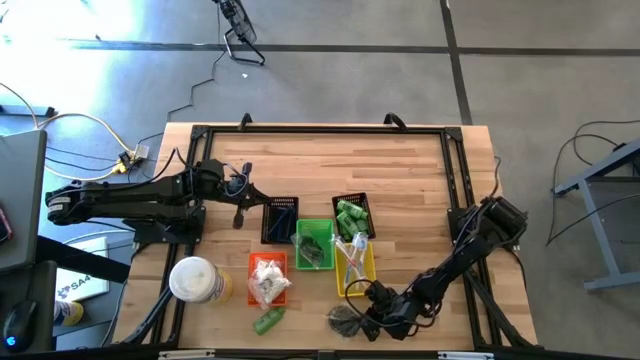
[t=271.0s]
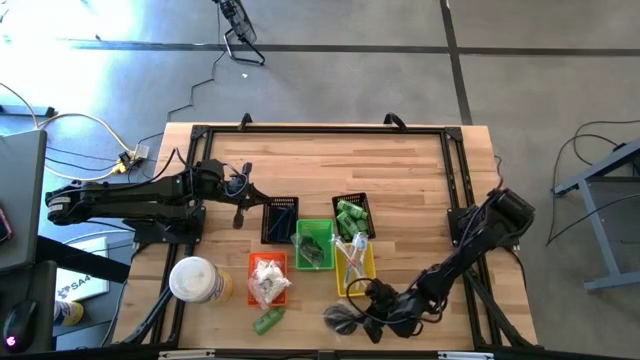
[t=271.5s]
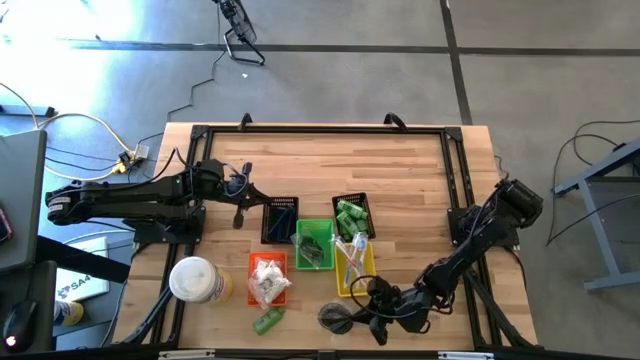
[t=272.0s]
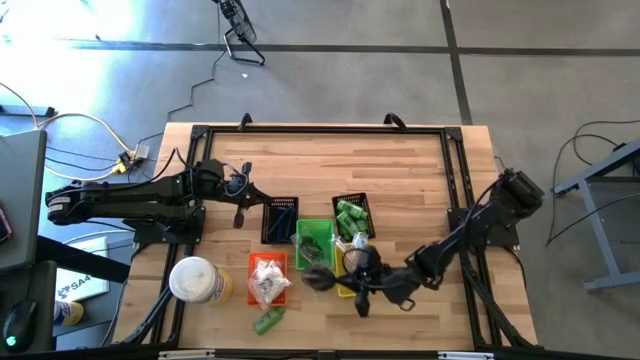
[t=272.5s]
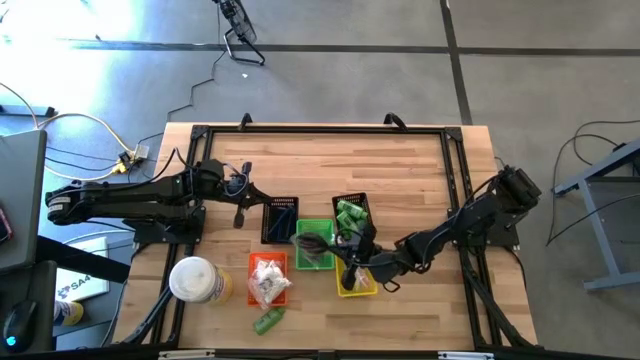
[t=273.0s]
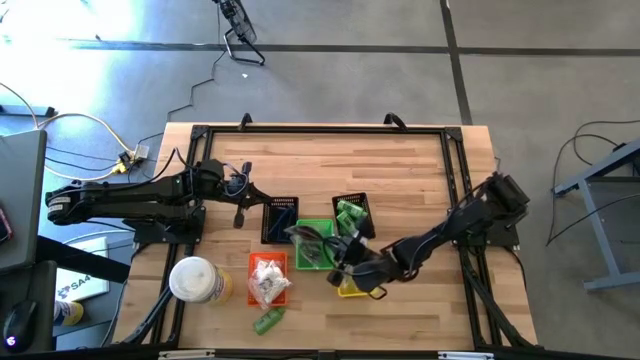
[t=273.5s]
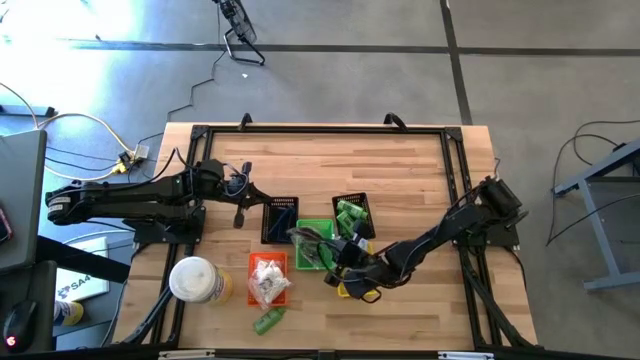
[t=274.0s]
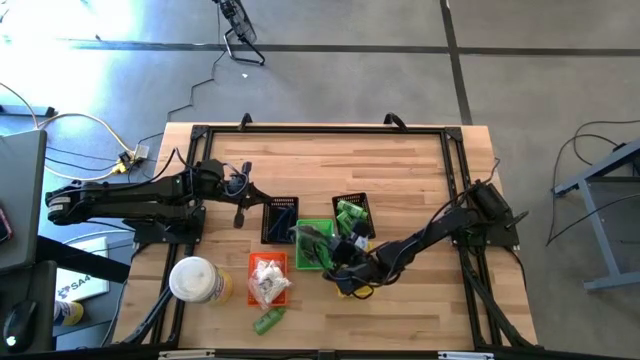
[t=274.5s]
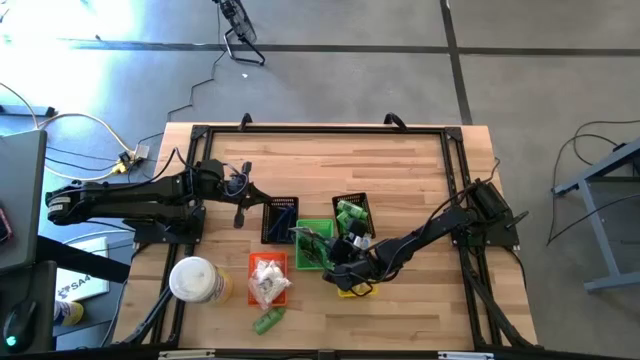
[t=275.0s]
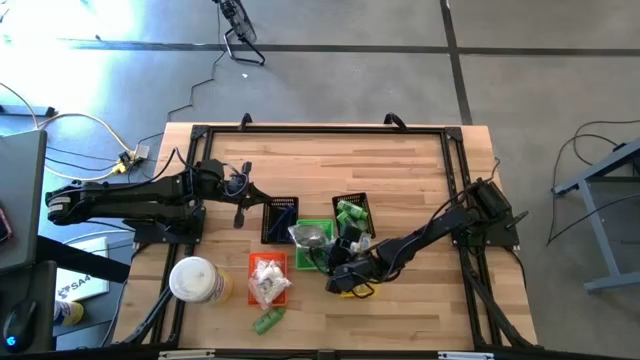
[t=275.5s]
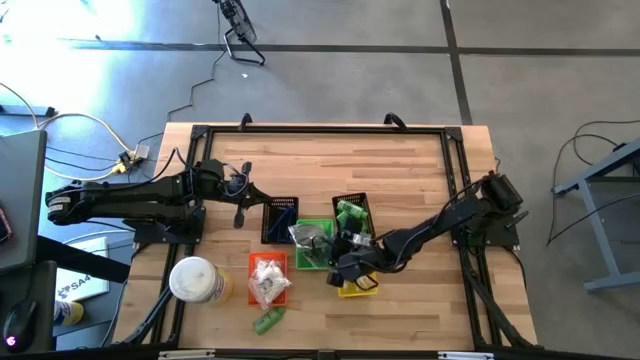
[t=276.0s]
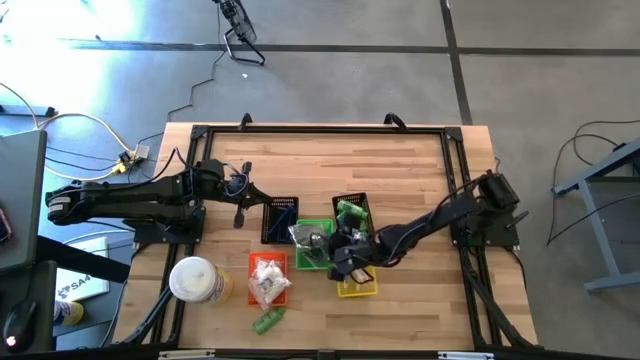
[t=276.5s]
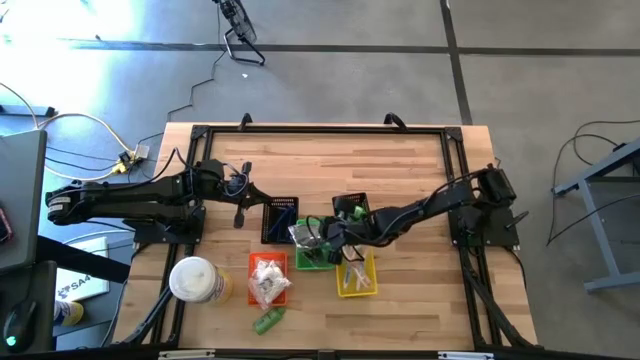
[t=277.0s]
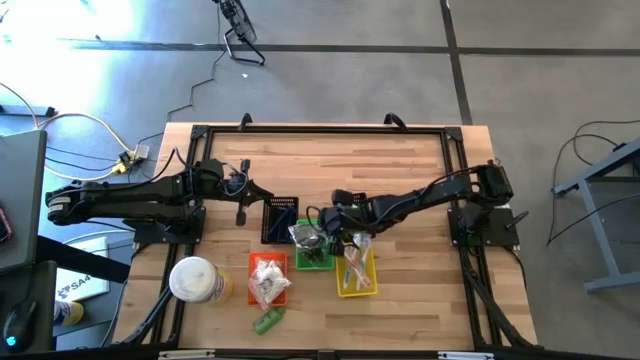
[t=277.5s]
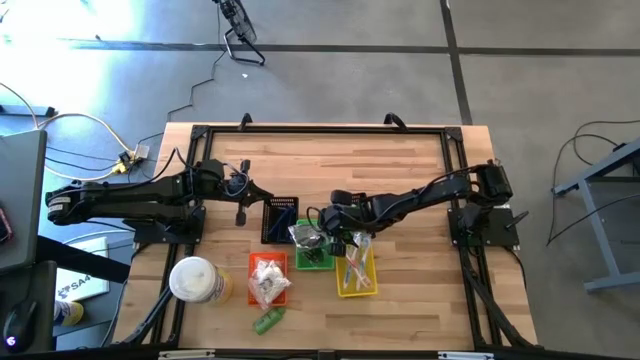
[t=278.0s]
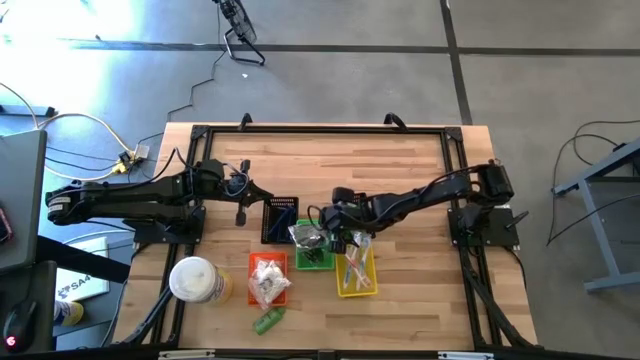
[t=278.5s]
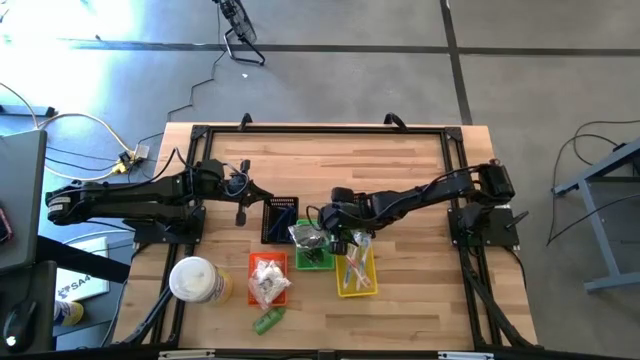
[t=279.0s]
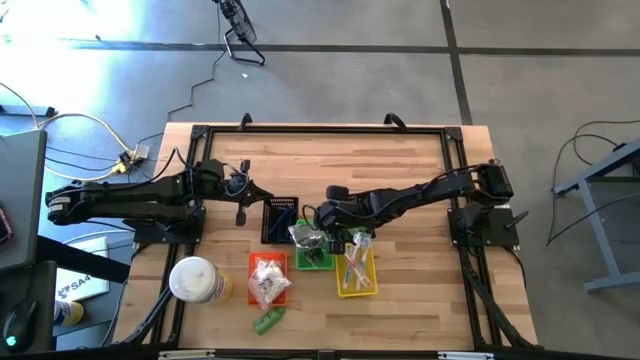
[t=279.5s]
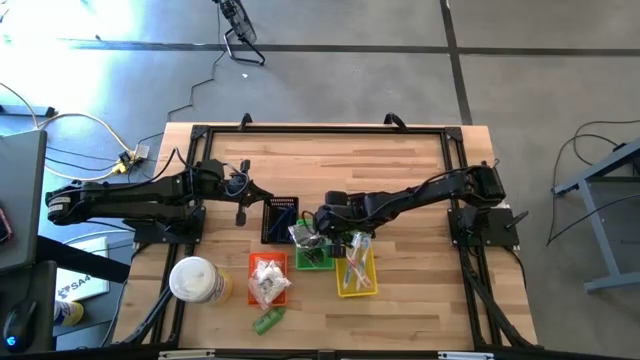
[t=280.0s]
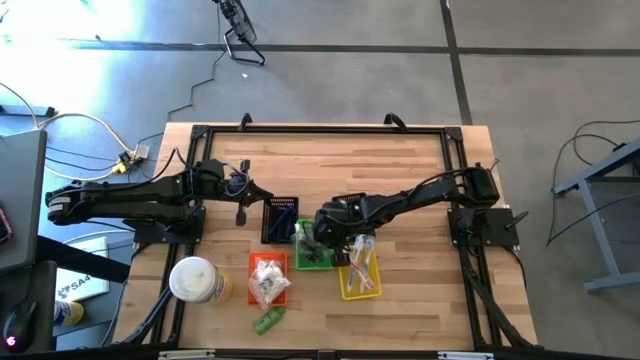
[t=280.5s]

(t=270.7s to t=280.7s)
Task: Pick & Place Travel size toiletries
Put the black hairbrush into the green bin

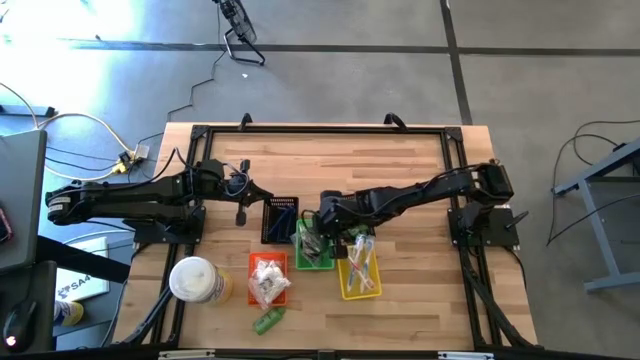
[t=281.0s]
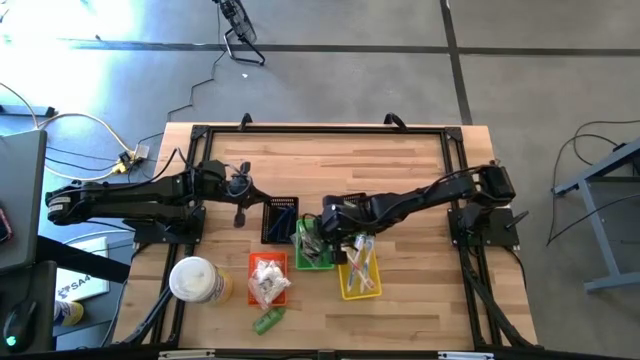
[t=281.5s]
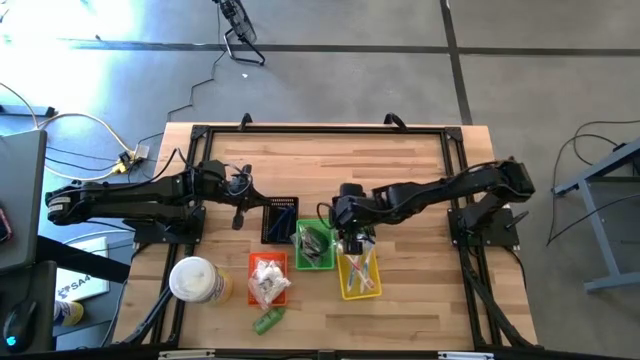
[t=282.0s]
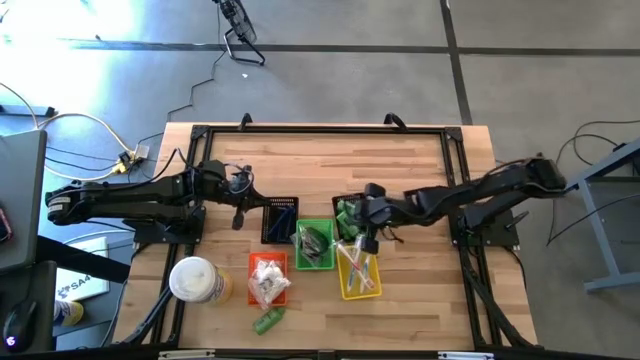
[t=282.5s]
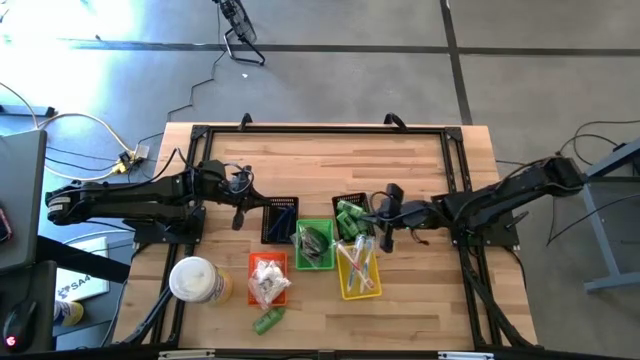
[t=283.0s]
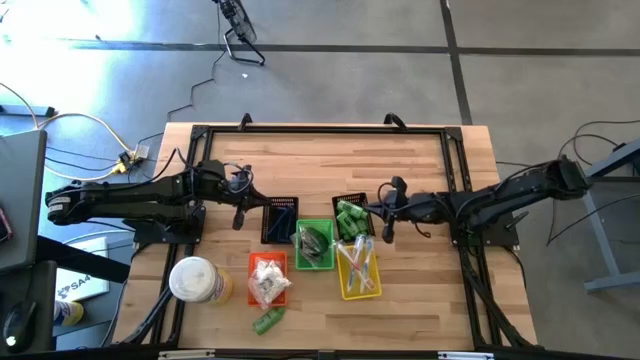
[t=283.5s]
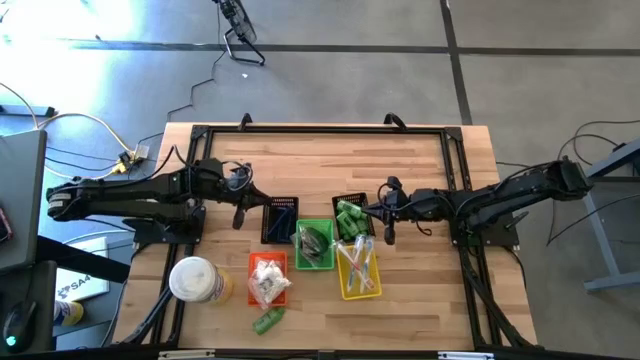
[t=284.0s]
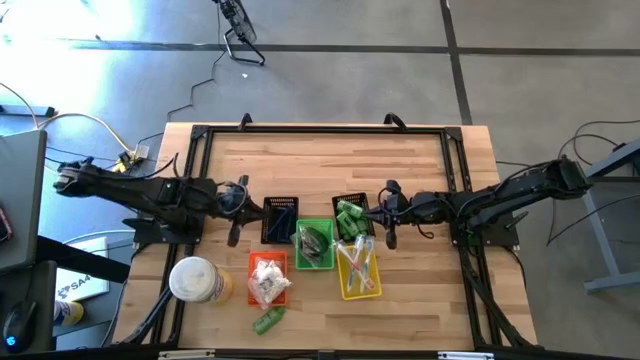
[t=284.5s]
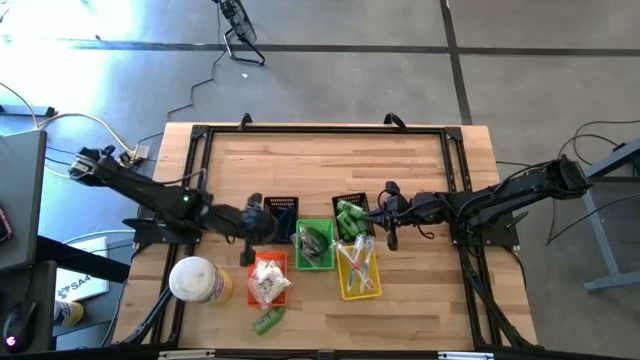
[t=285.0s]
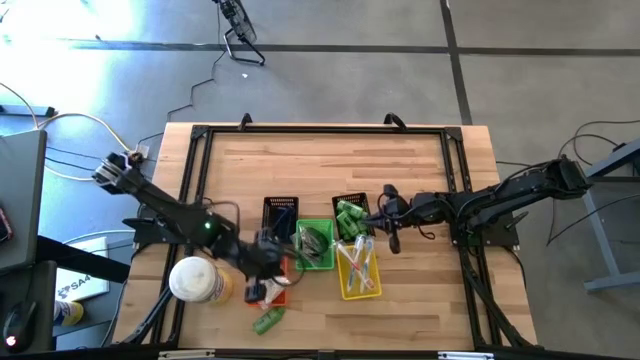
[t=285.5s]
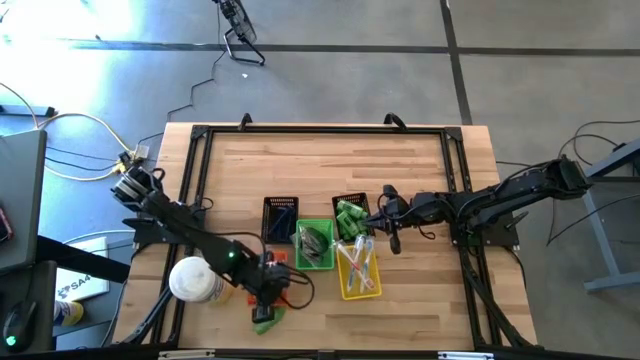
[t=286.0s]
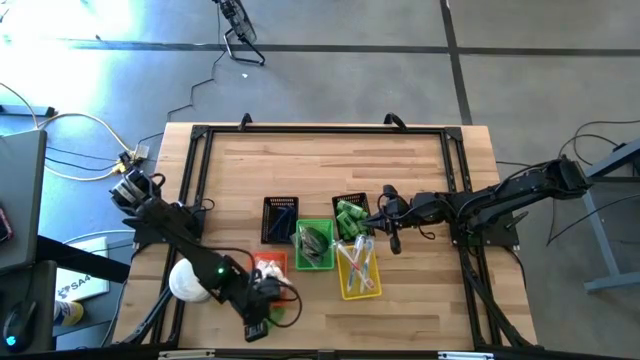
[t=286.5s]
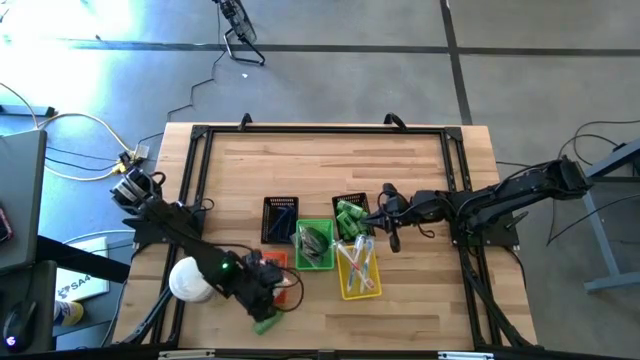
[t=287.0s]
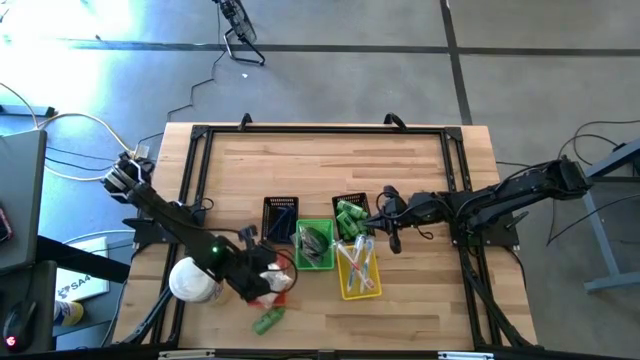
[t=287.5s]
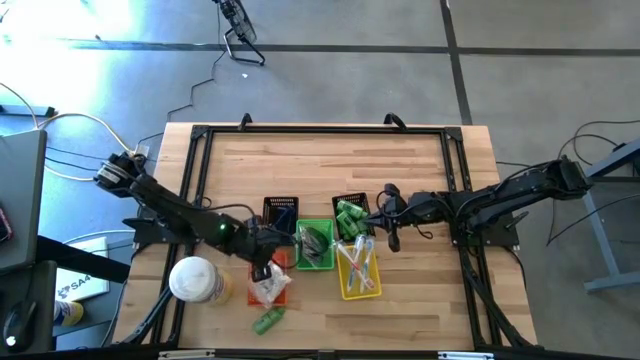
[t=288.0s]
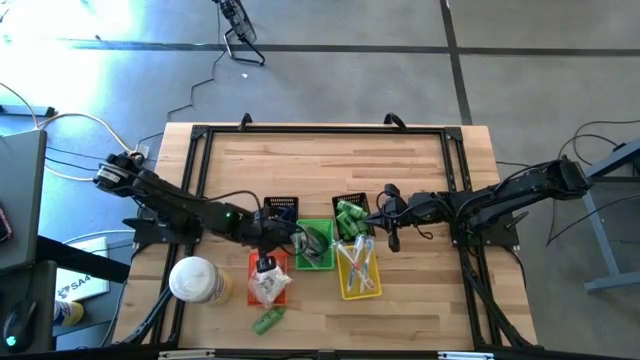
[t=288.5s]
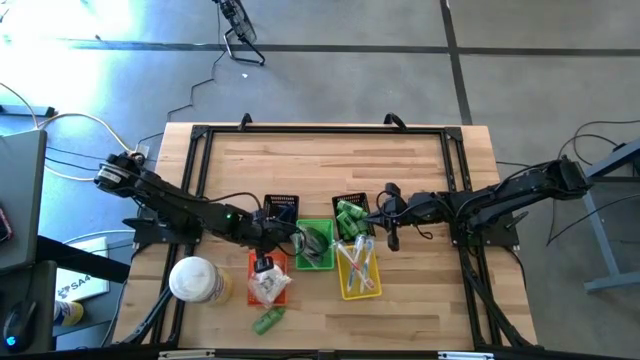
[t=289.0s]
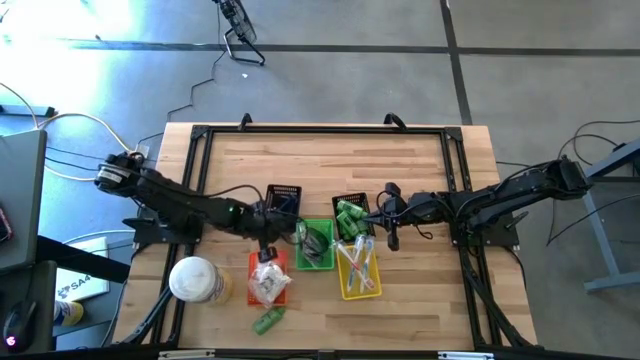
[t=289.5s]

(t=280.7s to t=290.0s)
Adjust the blue bin on the table

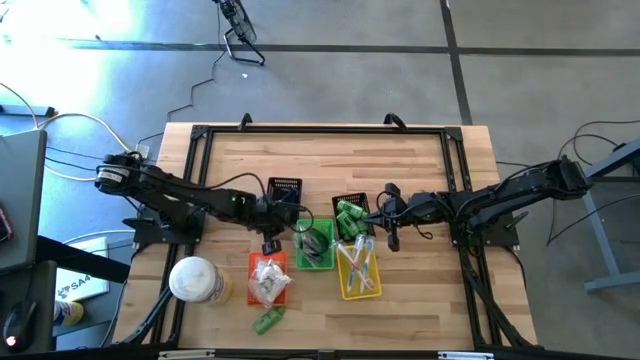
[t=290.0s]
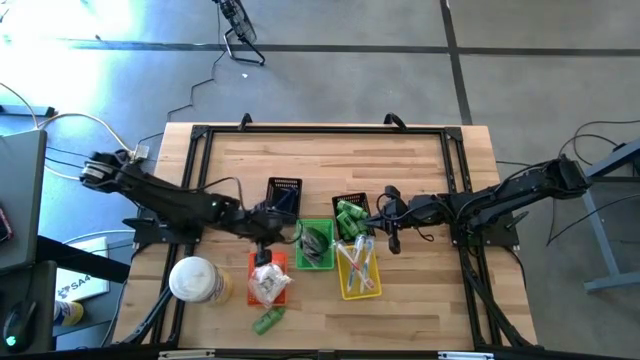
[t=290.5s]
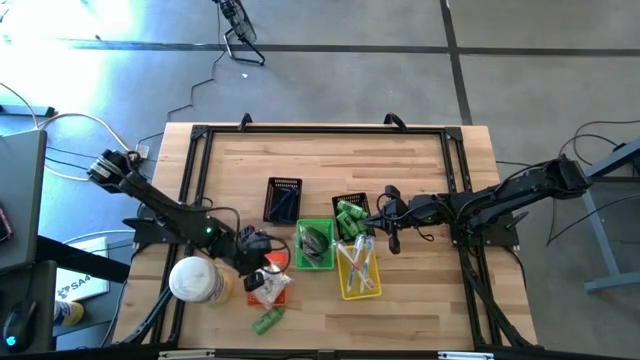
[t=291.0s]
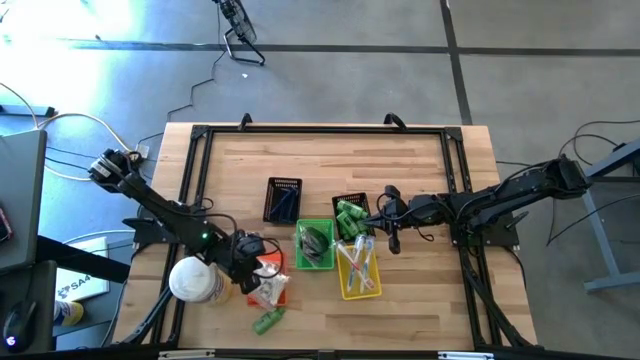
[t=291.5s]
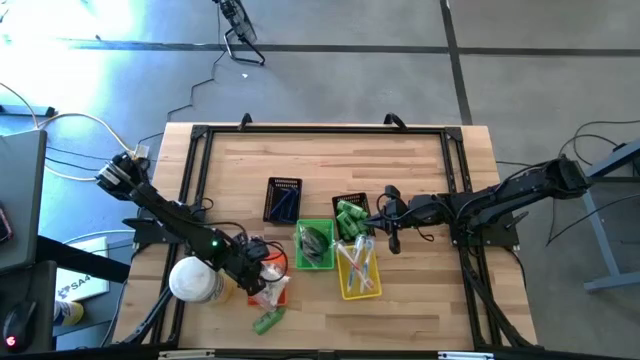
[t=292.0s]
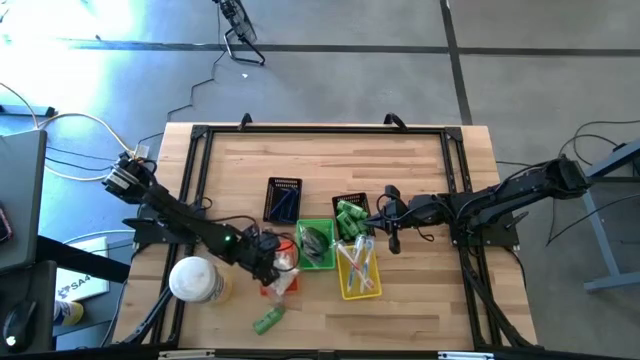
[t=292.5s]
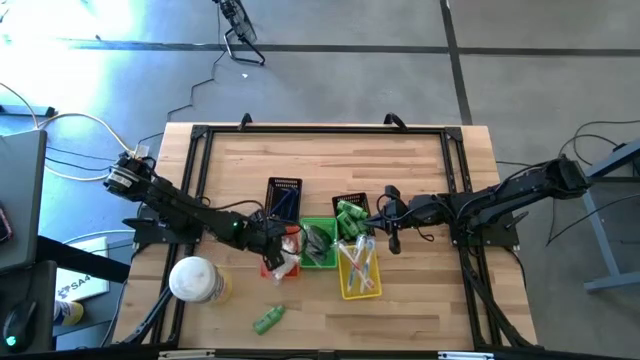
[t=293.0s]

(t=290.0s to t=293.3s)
Adjust the orange bin on the table
